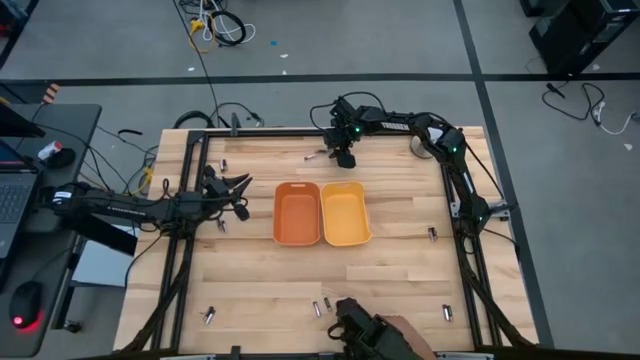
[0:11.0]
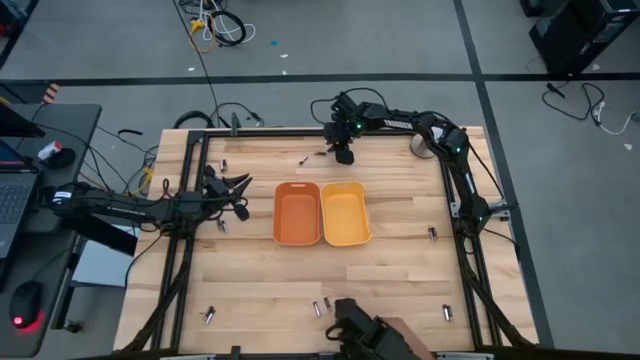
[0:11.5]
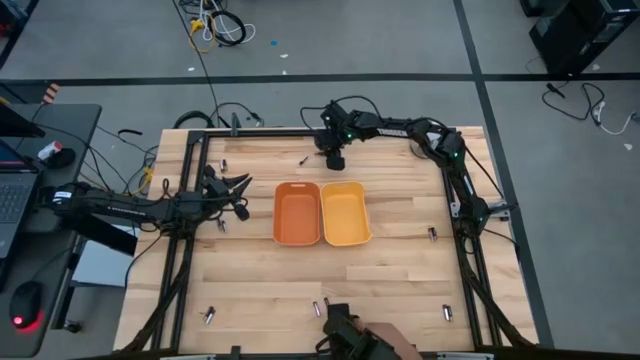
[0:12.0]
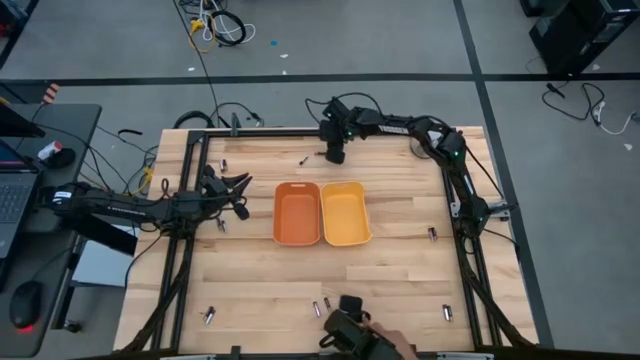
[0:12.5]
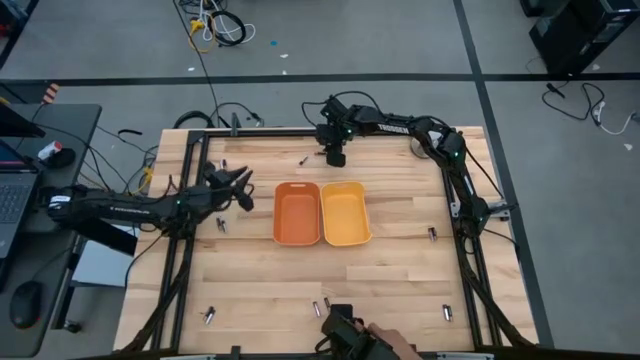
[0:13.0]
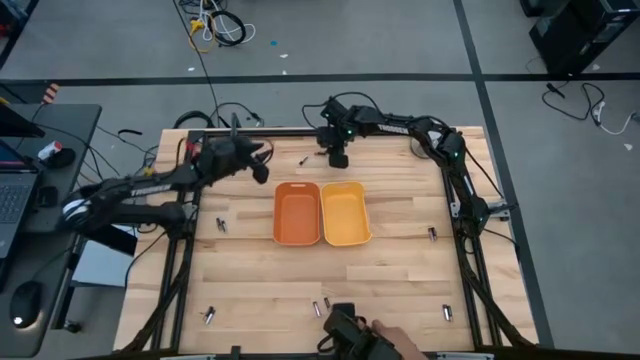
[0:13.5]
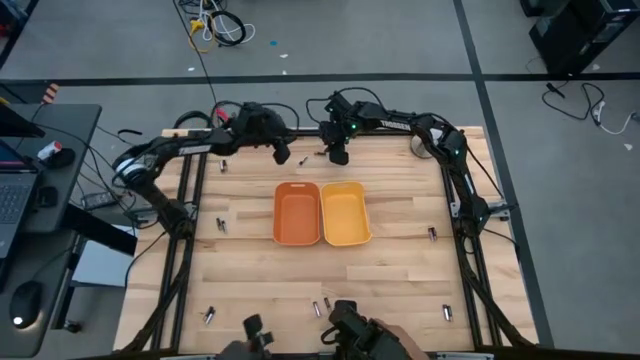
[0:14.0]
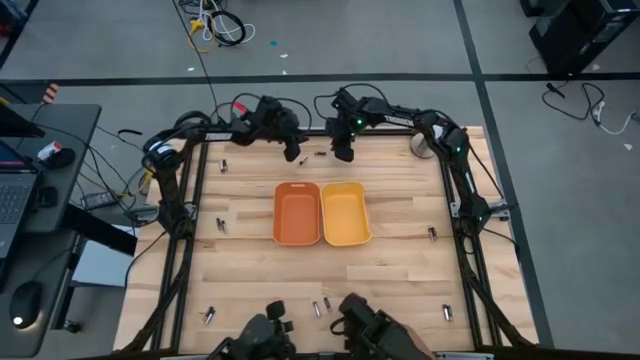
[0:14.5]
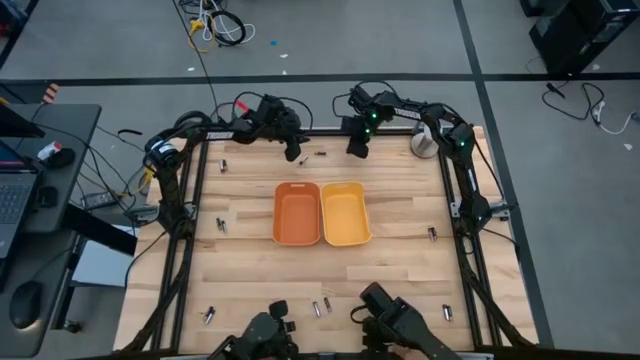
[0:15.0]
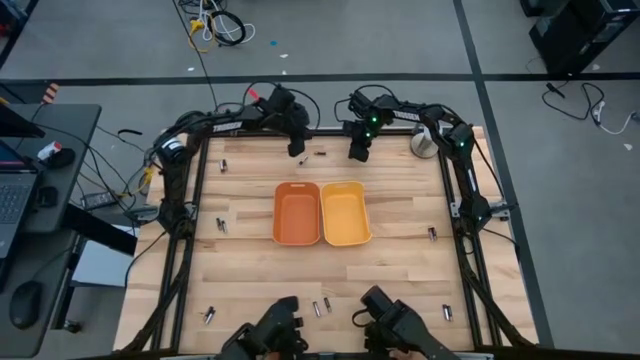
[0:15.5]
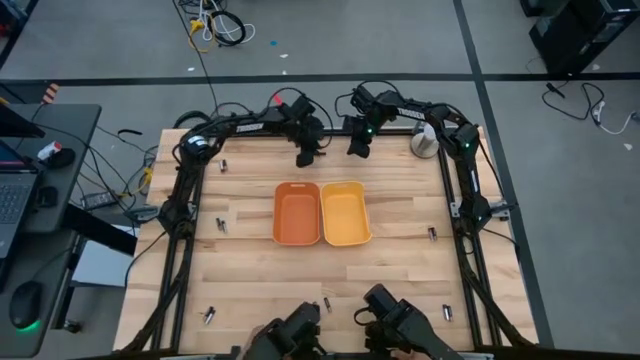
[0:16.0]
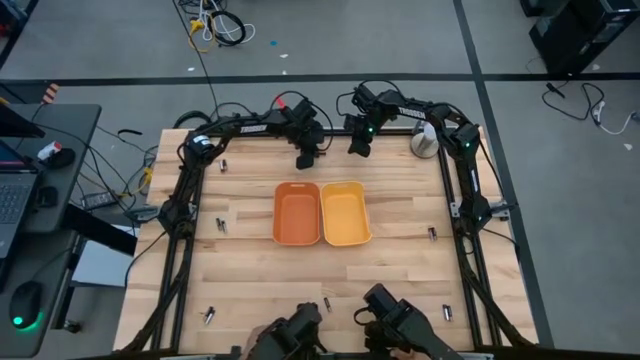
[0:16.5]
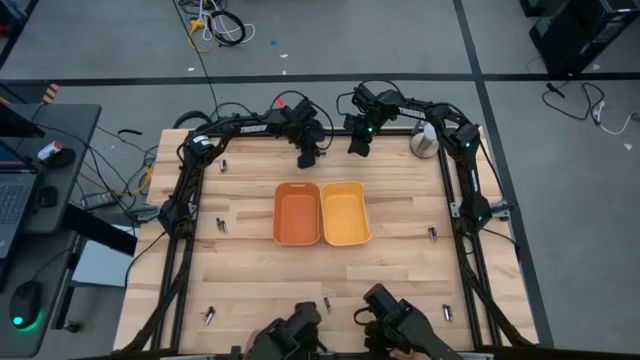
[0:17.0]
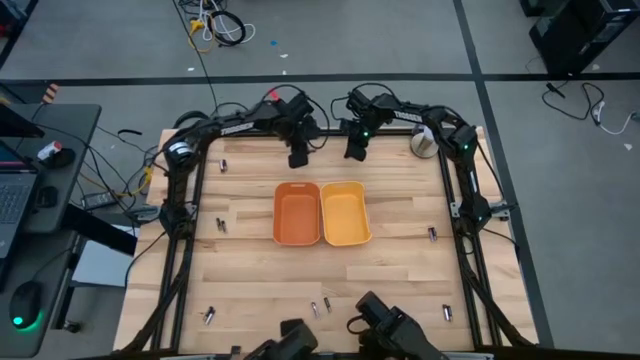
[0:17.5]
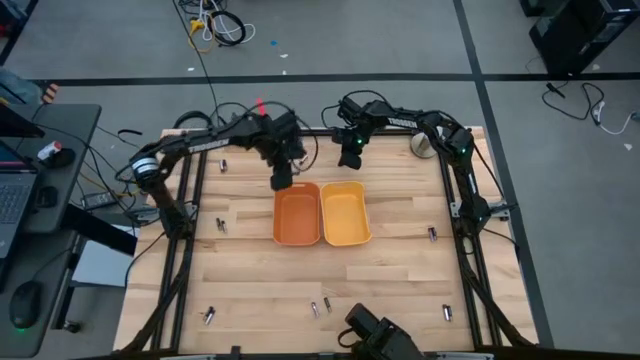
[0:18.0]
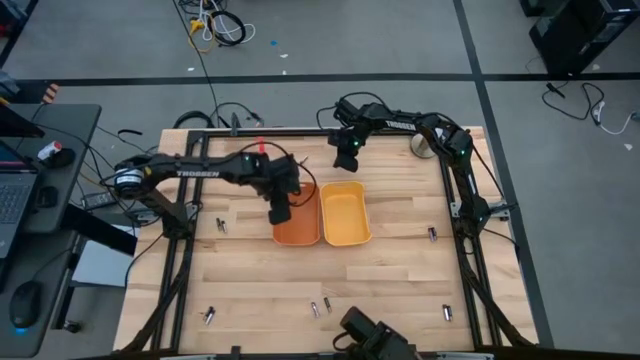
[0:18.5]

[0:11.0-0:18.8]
Task: Sort batteries
Put the black battery into the orange bin

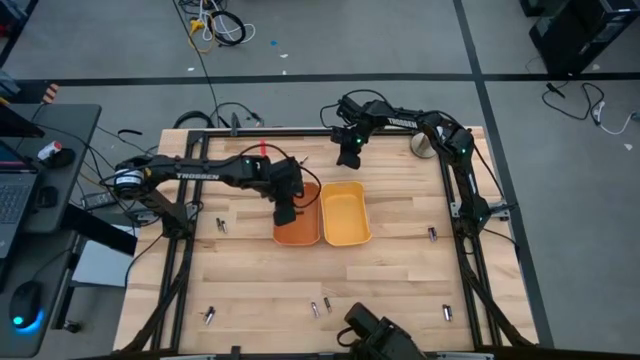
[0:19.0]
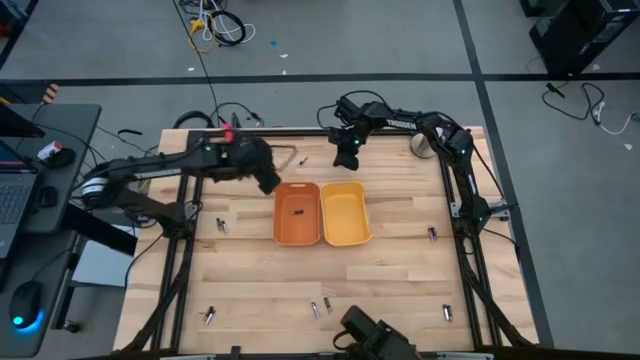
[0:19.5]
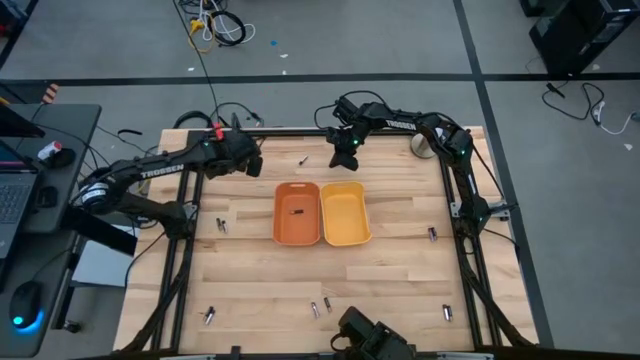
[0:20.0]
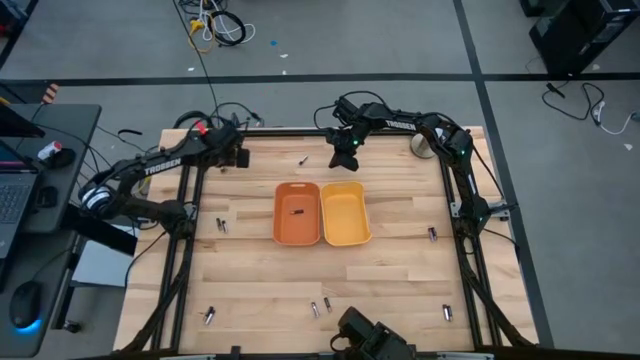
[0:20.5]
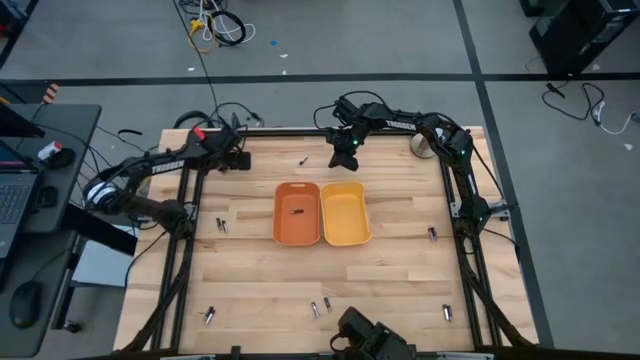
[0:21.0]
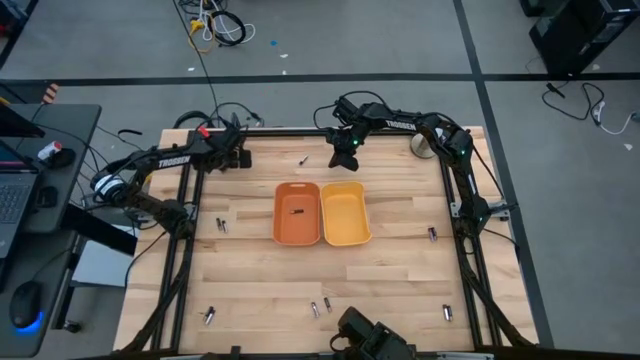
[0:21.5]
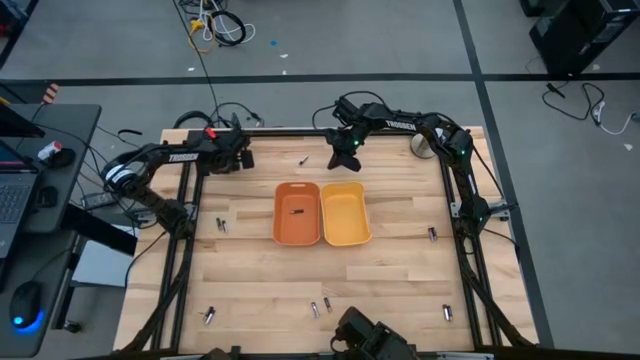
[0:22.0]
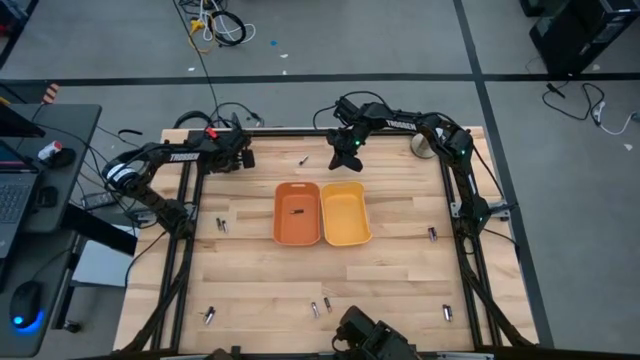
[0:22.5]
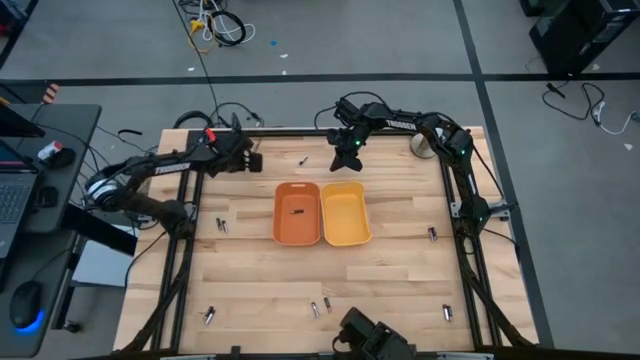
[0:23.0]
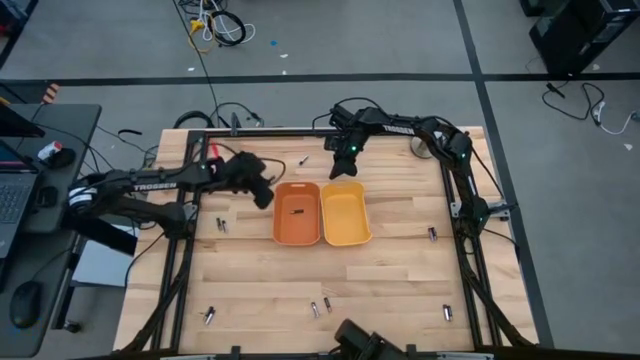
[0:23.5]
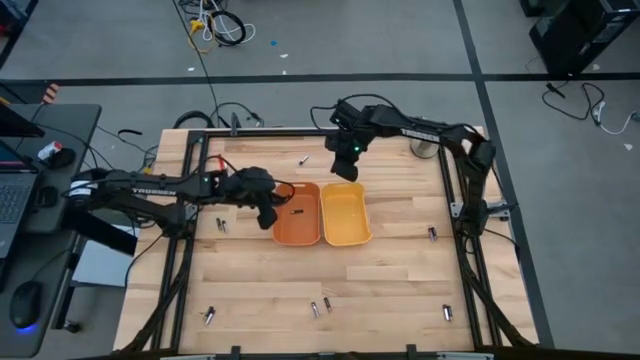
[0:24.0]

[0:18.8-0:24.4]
Put the black battery into the orange bin

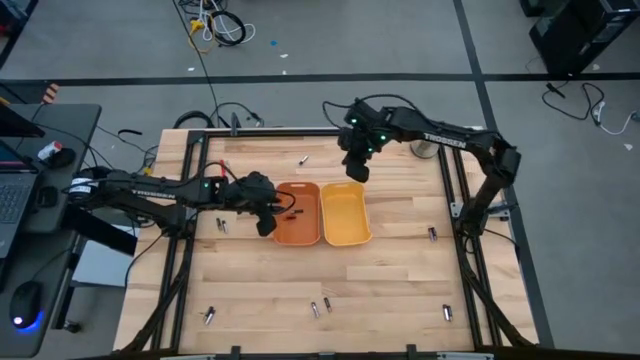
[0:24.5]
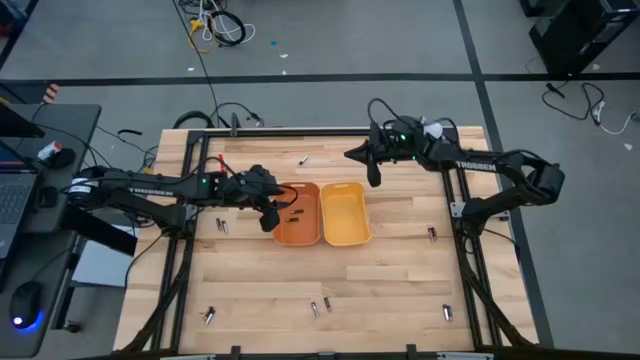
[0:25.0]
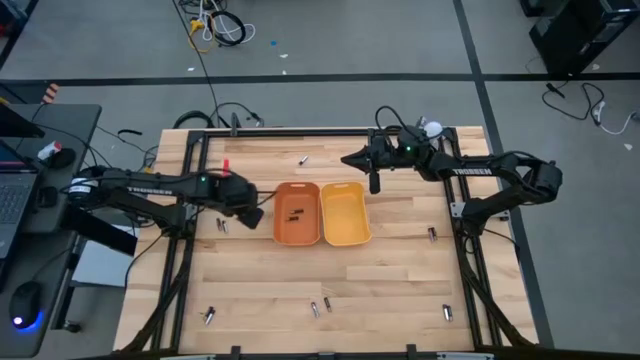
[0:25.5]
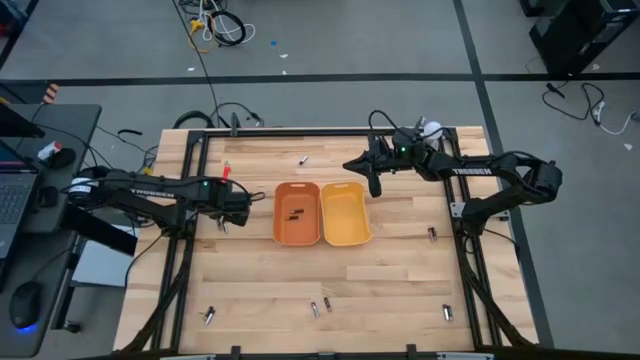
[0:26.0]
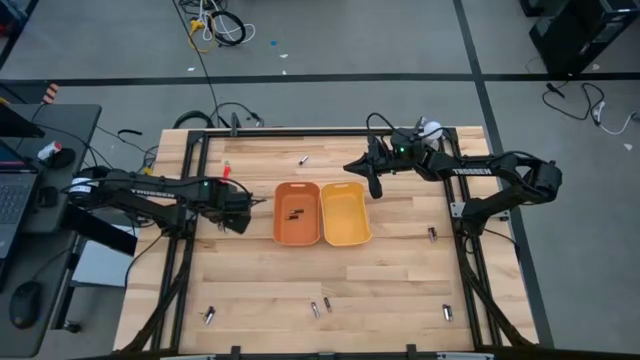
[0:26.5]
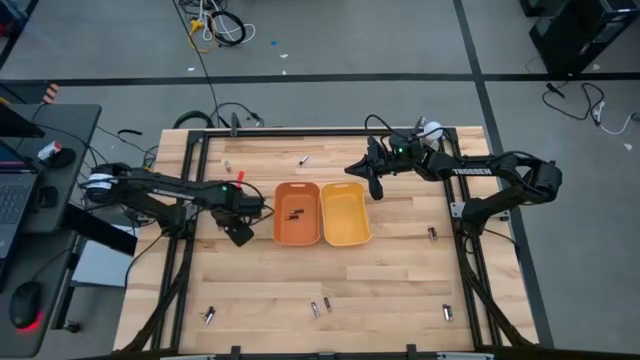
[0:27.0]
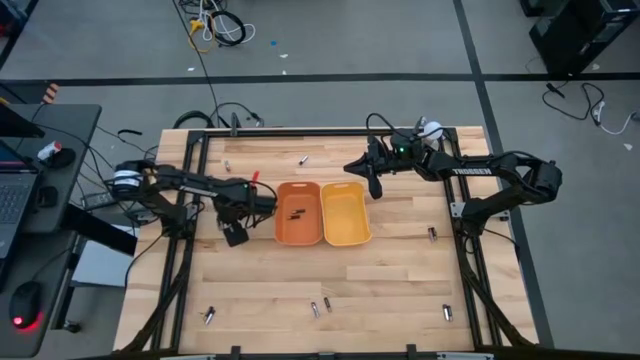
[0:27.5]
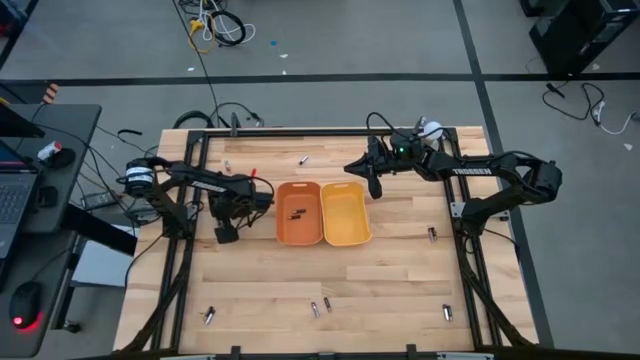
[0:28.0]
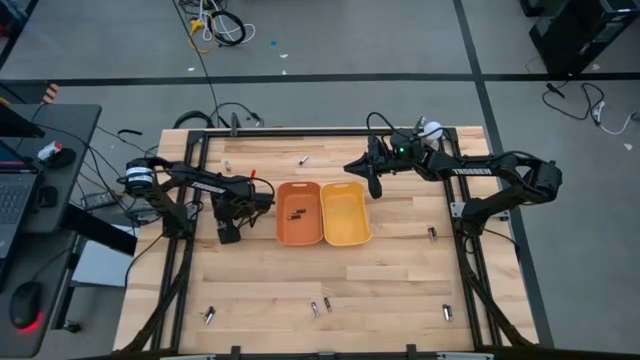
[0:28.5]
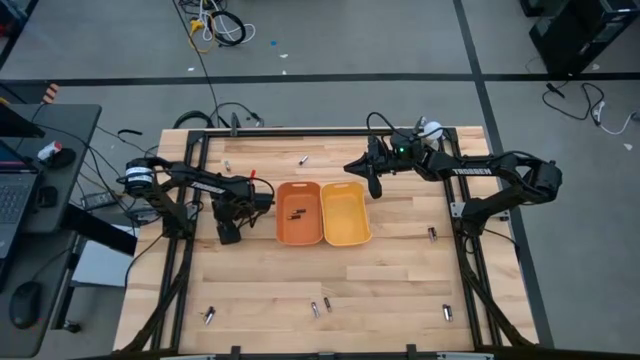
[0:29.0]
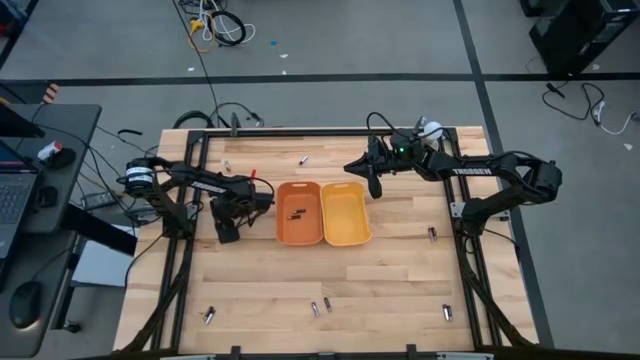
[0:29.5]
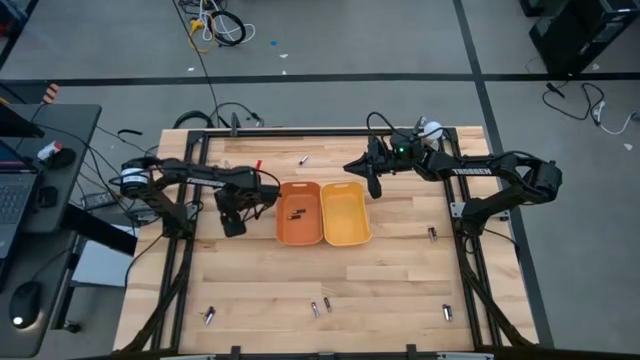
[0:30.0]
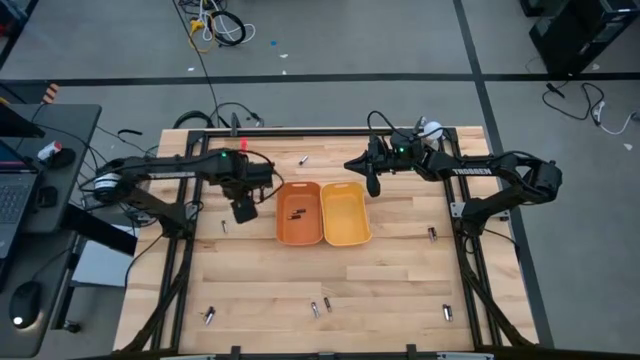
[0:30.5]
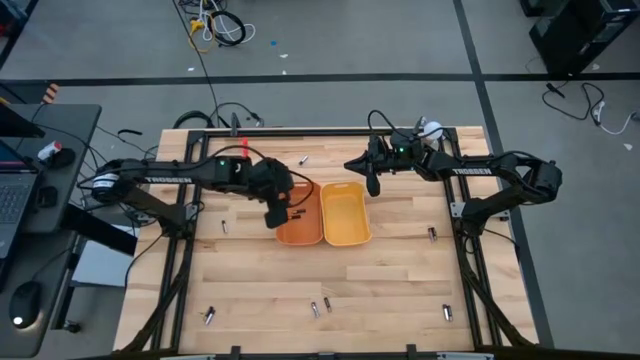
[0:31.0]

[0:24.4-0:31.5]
Put the black battery into the orange bin

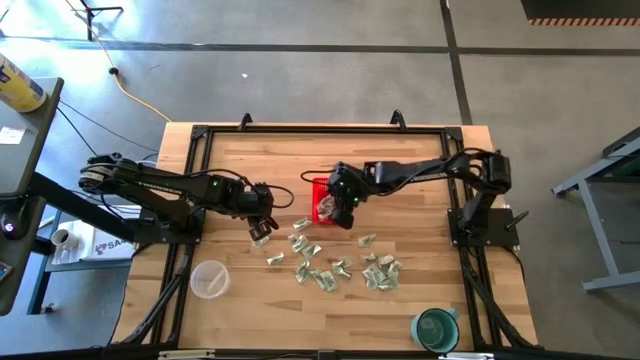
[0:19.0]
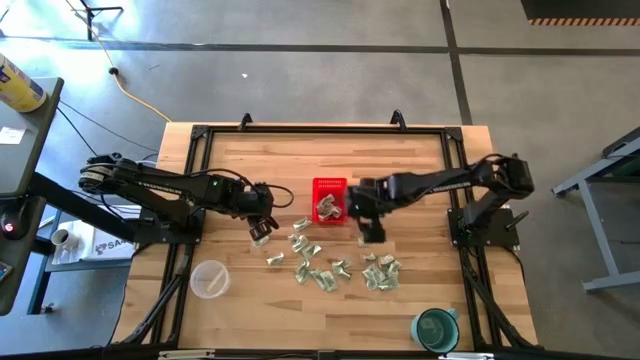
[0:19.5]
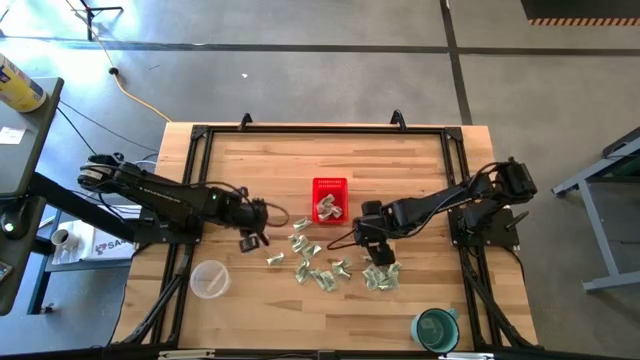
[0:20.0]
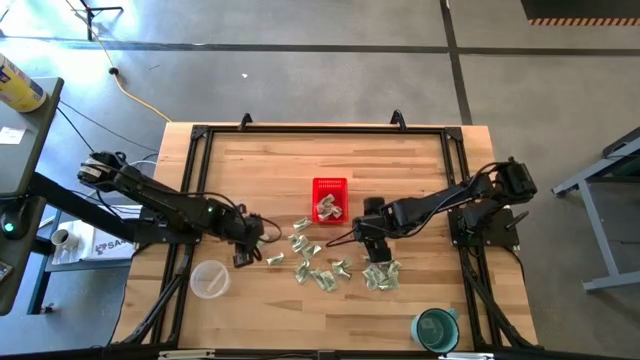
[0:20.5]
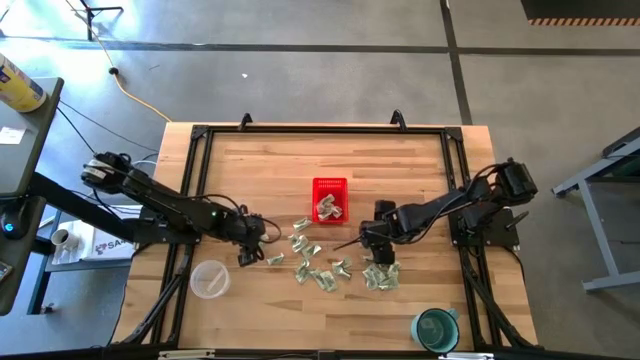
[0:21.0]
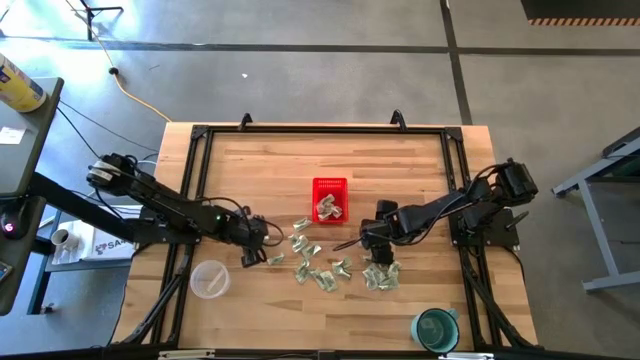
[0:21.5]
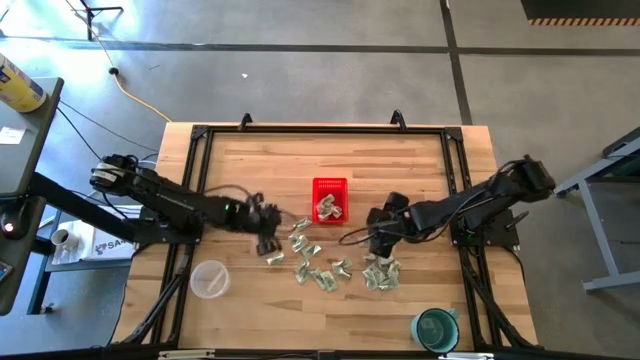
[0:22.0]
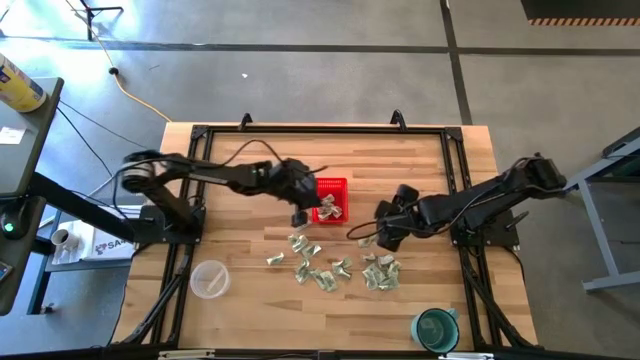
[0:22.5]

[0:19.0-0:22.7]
Task: Pick and place items into bin
Put the light green stevia packet into the red bin
